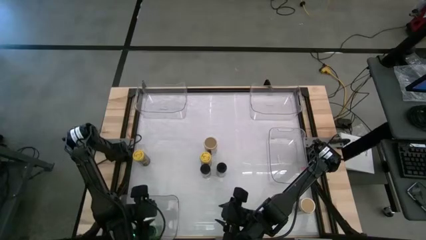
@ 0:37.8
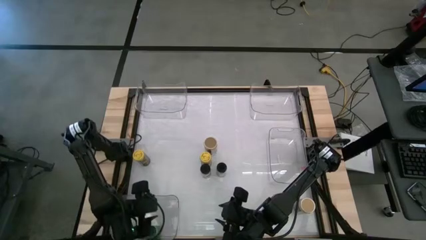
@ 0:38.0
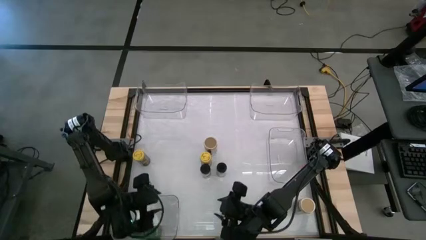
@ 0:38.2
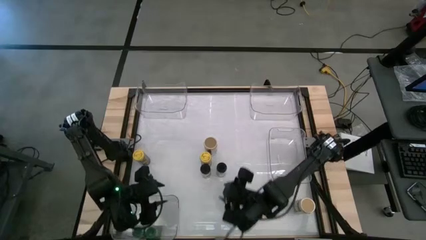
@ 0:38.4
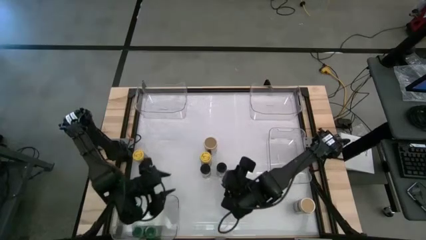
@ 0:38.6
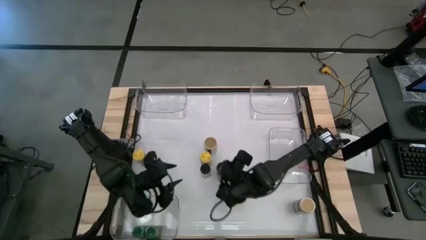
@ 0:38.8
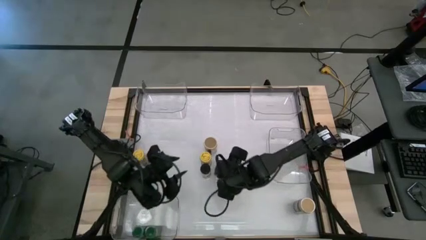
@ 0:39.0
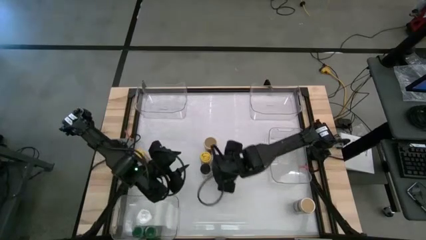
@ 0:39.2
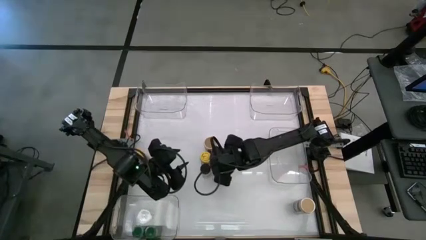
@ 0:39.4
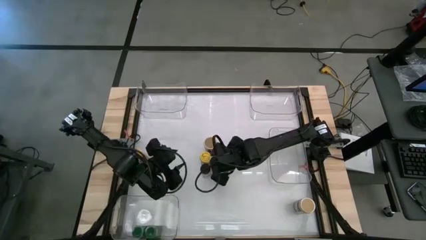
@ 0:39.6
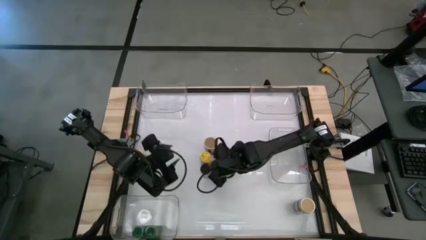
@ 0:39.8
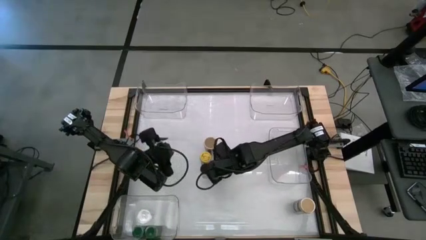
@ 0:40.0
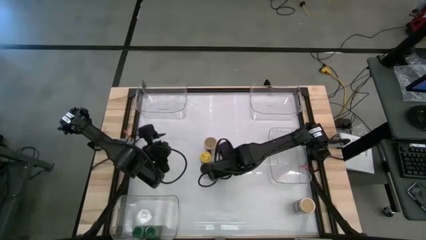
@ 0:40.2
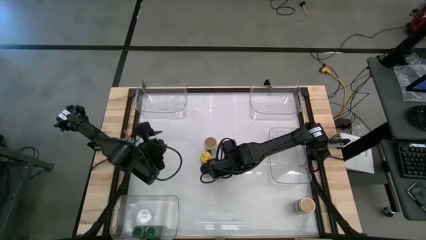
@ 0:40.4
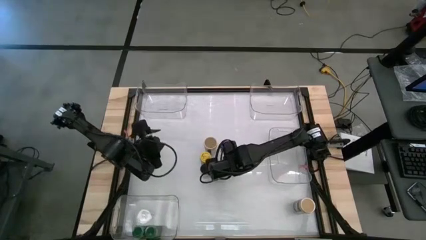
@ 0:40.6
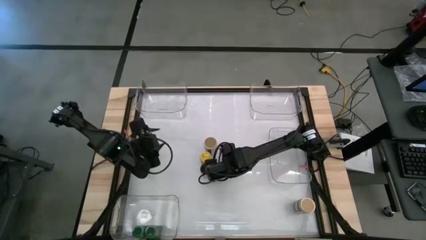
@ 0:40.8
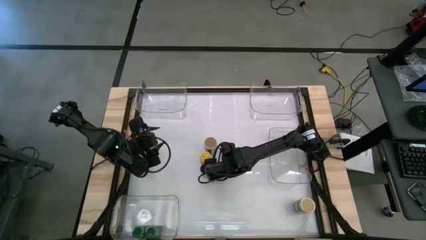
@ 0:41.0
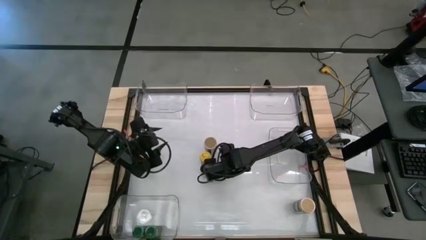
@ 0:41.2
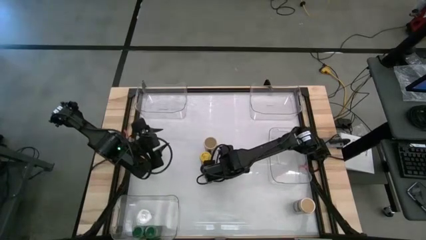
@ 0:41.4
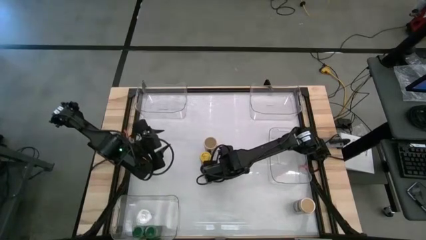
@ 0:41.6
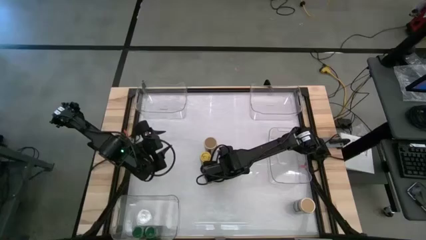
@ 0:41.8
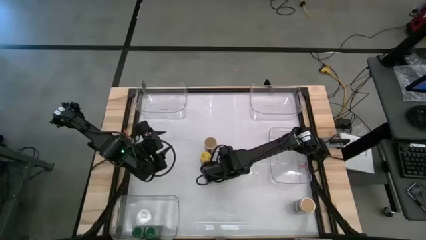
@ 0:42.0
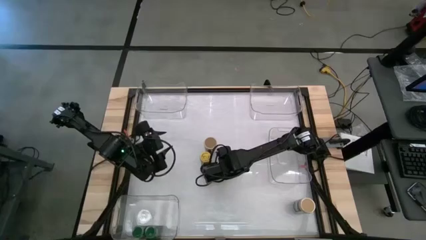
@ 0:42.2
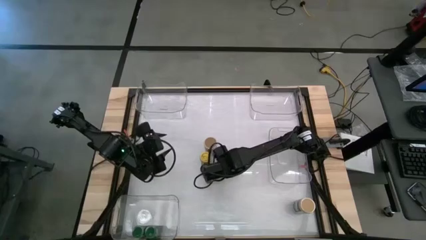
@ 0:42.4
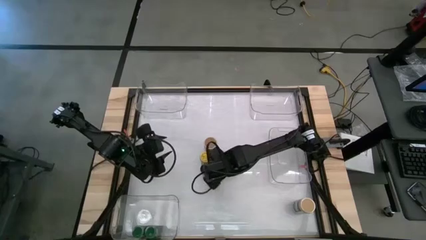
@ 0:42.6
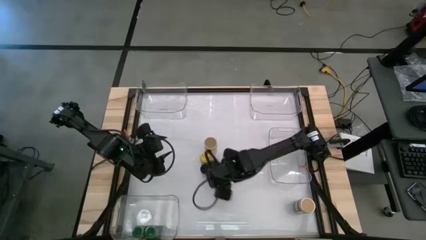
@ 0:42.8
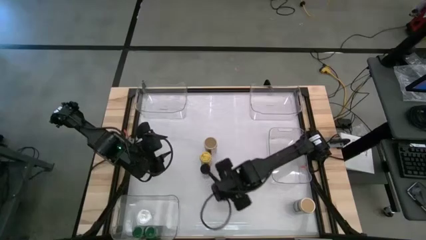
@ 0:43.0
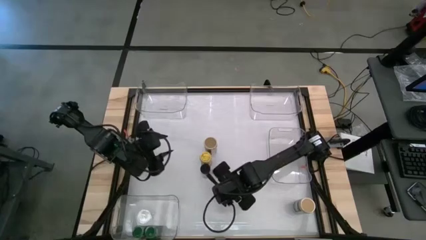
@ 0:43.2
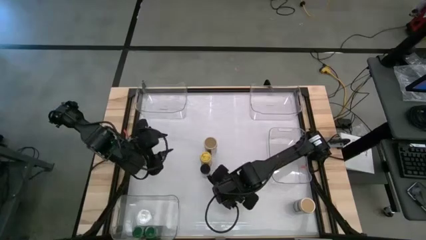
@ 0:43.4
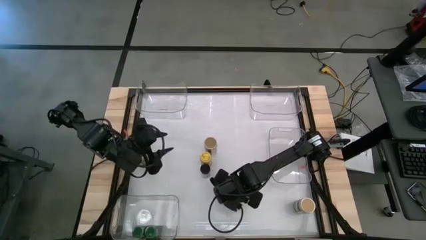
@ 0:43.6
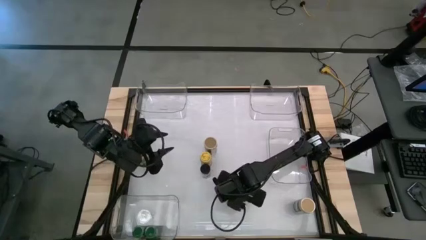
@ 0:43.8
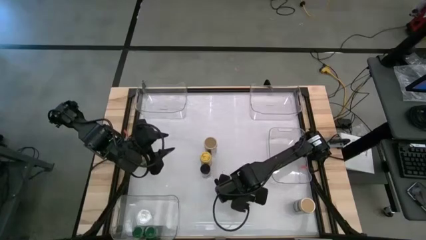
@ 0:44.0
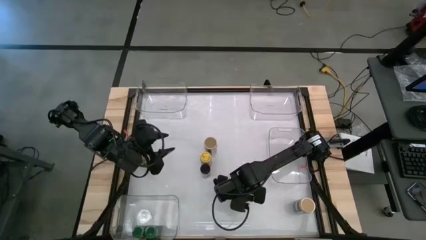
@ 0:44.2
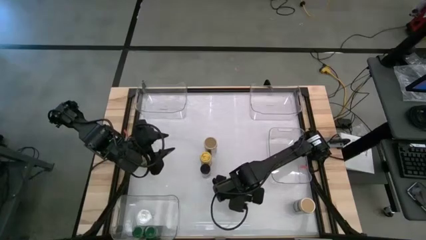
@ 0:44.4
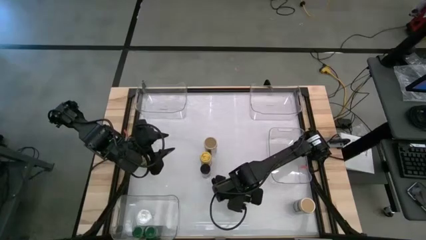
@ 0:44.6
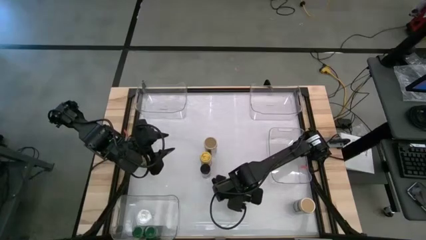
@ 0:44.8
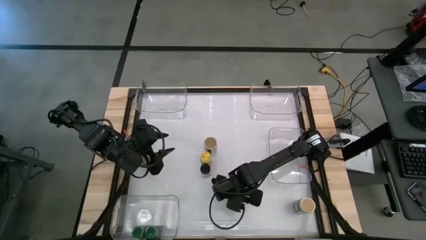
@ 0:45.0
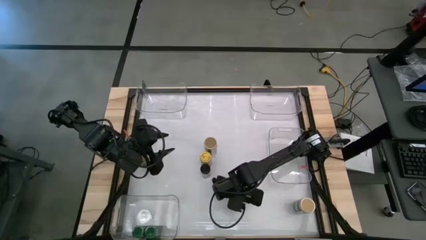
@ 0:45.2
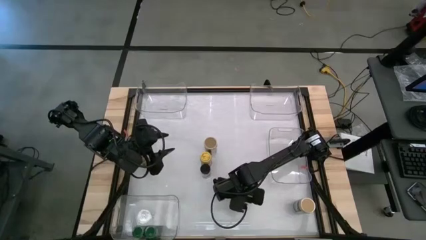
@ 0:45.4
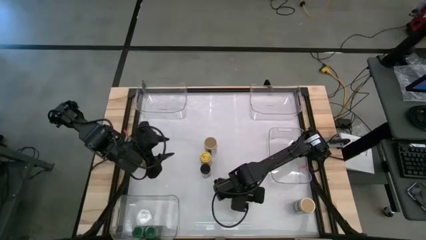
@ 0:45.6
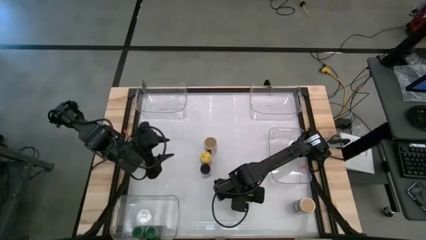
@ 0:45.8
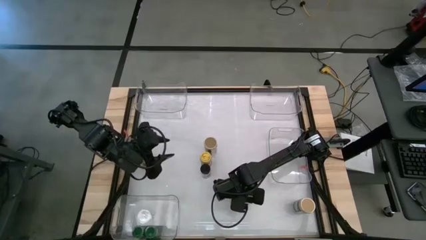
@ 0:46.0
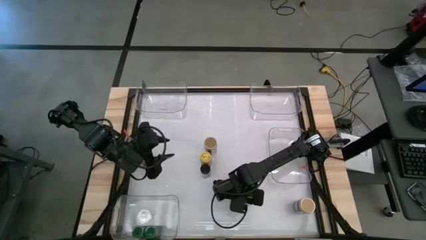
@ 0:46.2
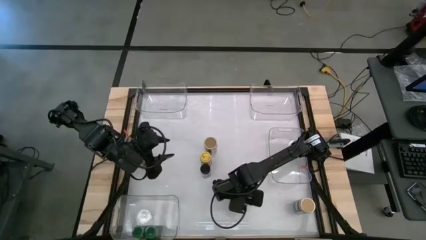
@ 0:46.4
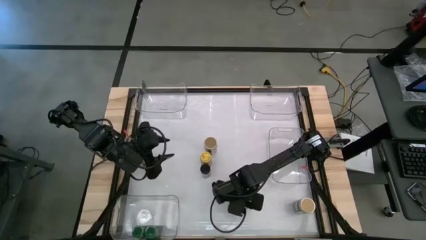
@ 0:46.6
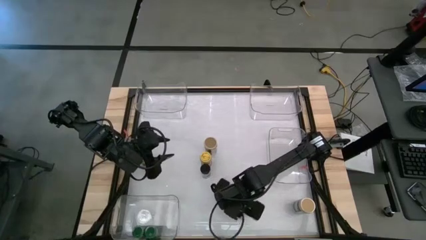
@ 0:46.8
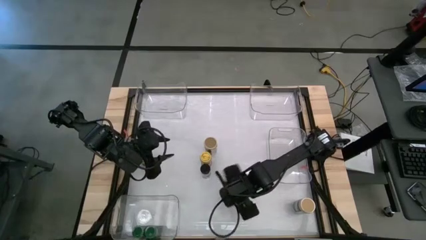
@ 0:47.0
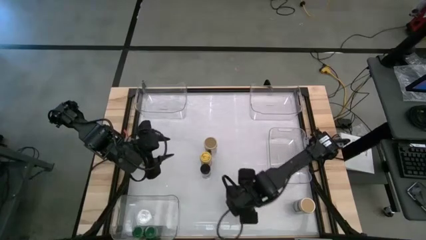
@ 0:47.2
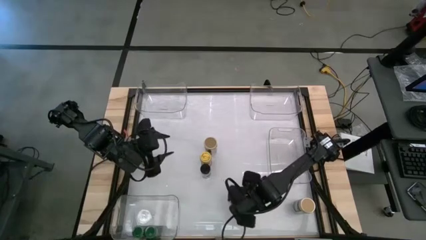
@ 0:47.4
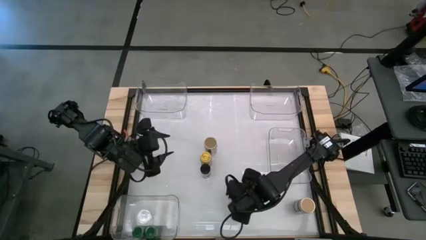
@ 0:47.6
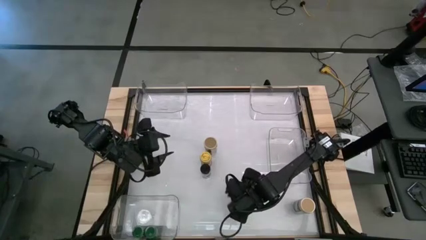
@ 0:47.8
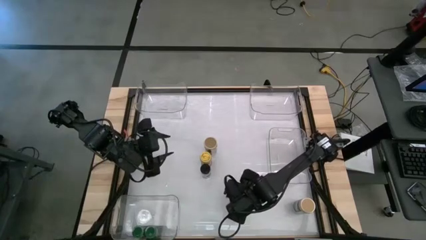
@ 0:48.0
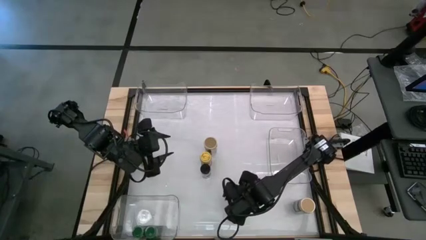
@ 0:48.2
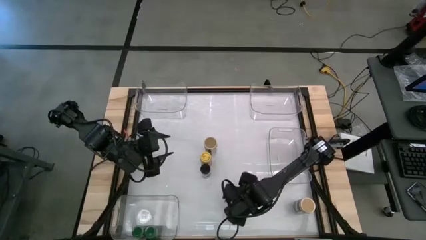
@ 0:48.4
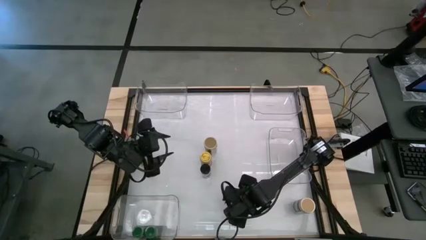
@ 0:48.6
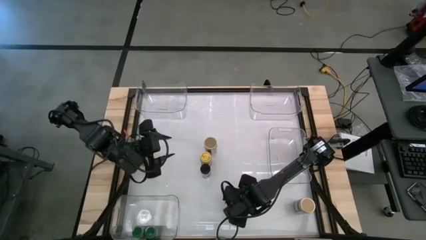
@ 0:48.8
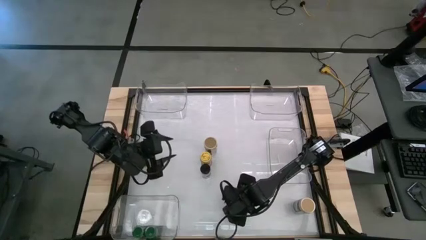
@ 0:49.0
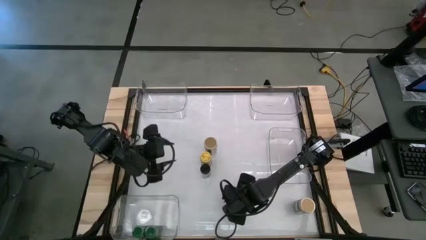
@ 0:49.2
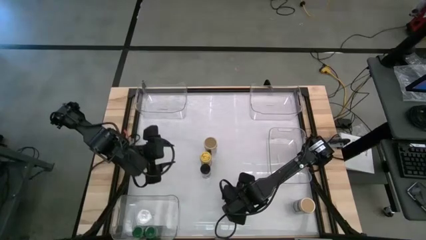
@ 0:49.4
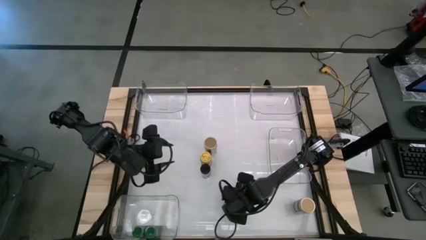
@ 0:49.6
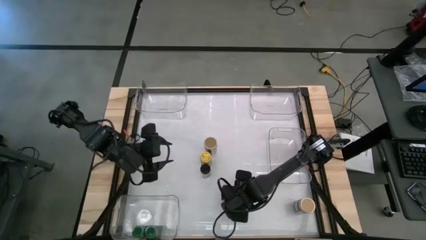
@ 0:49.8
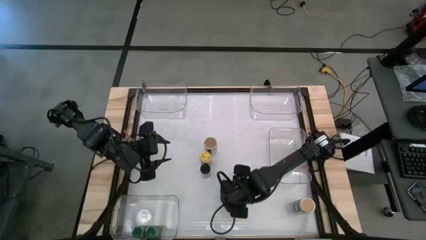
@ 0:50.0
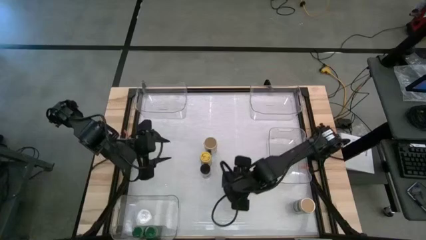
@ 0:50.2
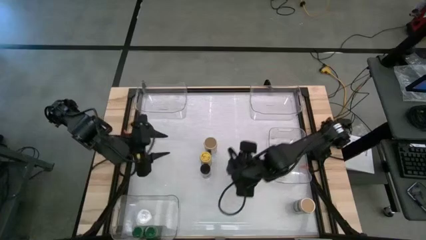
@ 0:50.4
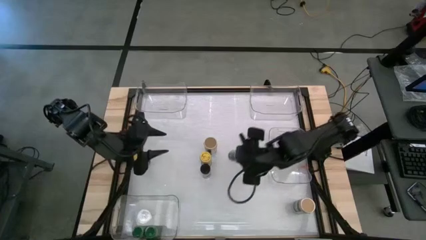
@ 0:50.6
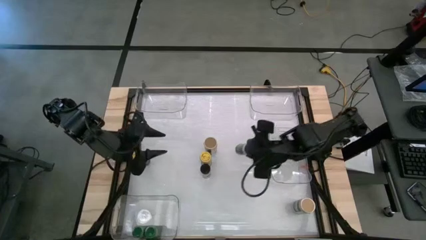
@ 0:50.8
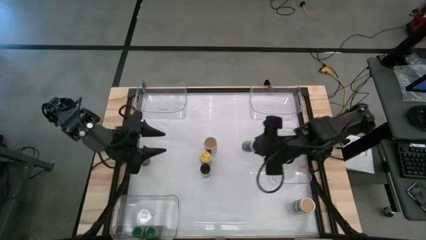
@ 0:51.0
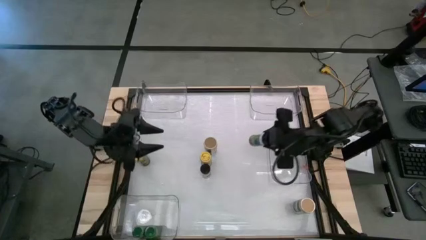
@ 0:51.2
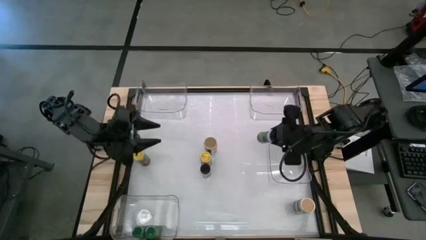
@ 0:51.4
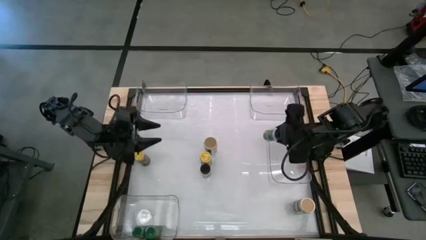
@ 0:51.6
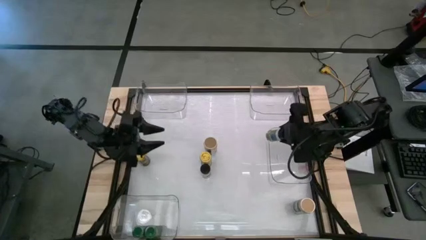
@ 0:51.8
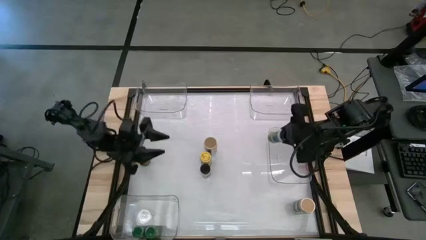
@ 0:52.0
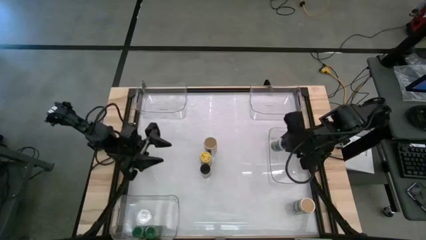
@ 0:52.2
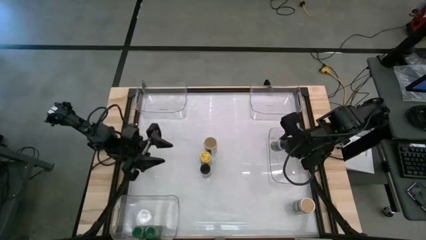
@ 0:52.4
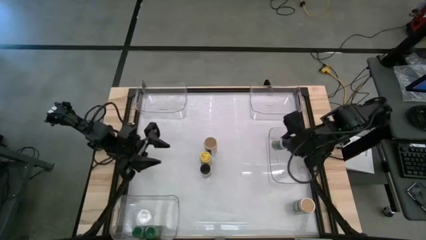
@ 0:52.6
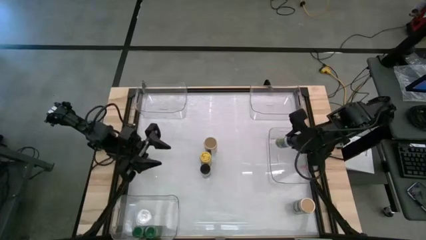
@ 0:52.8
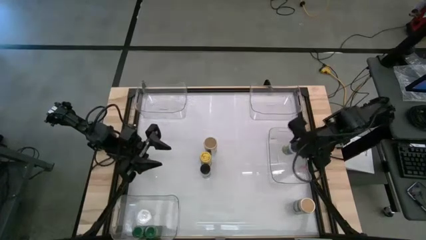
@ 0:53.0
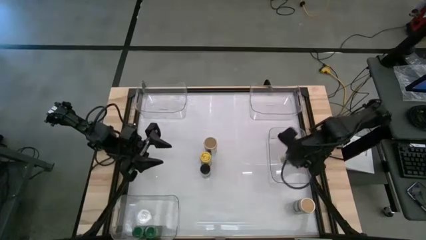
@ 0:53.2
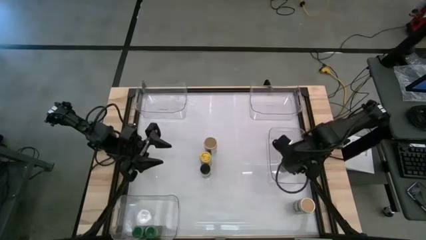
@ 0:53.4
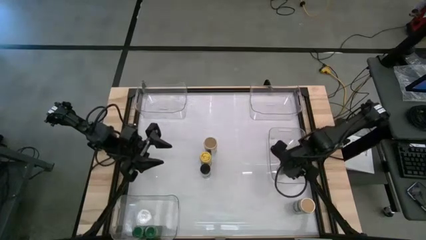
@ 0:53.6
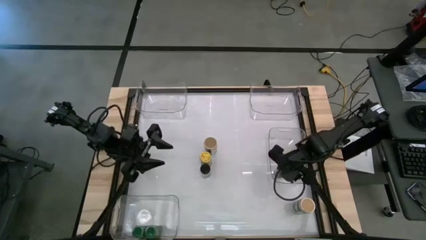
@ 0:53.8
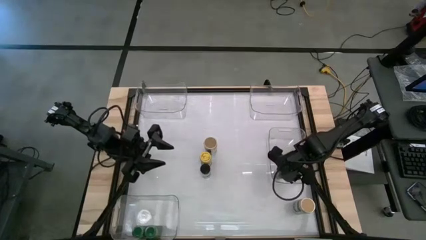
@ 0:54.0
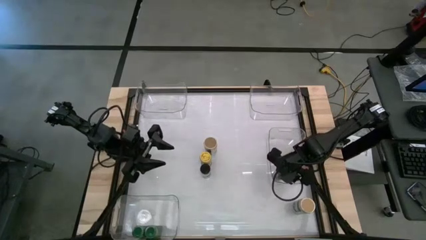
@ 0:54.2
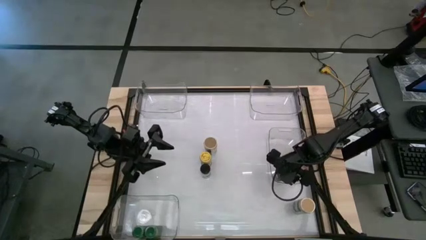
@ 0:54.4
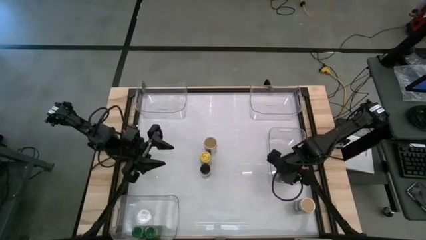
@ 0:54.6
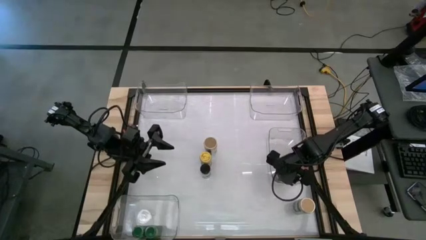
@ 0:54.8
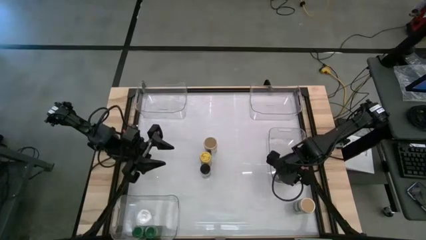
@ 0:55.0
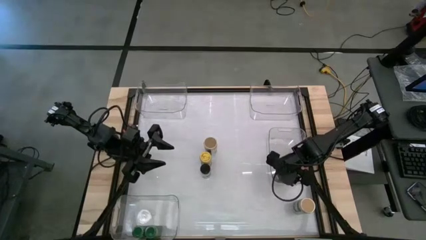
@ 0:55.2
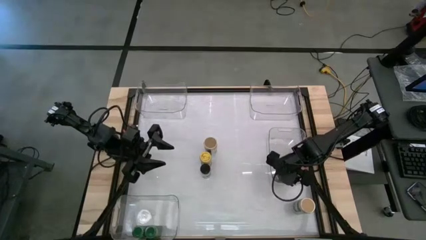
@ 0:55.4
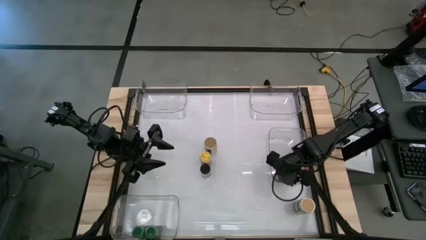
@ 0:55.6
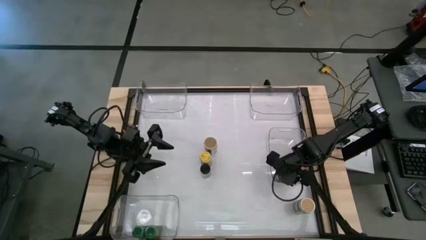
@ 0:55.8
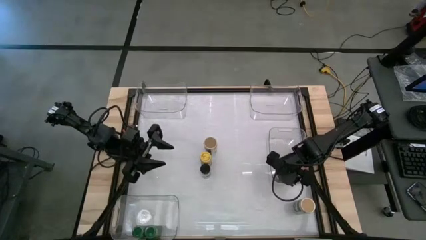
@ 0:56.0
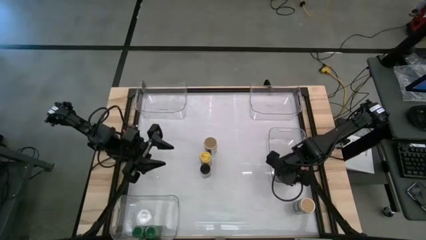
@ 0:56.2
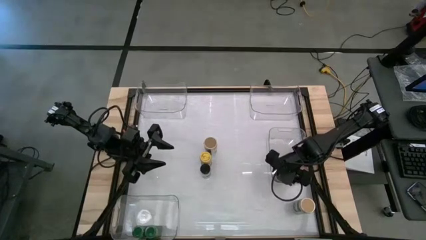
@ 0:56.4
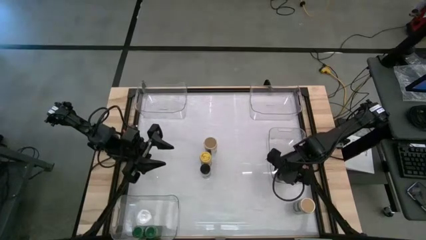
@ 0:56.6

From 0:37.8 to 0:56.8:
Task: Sort spices by type
Put the right black seasoning bottle into the middle transparent bin
